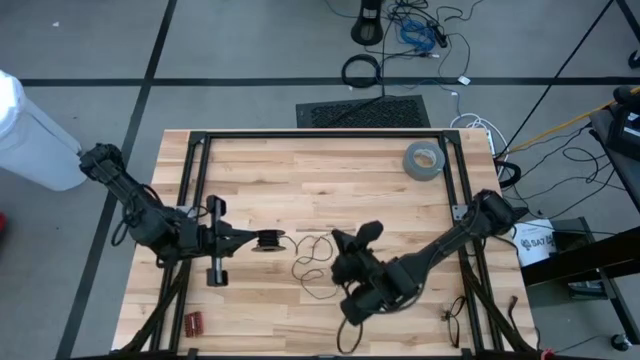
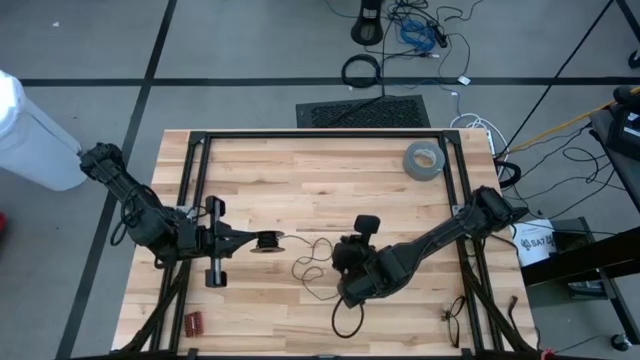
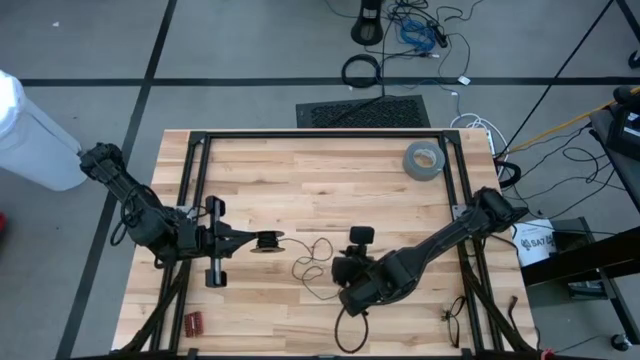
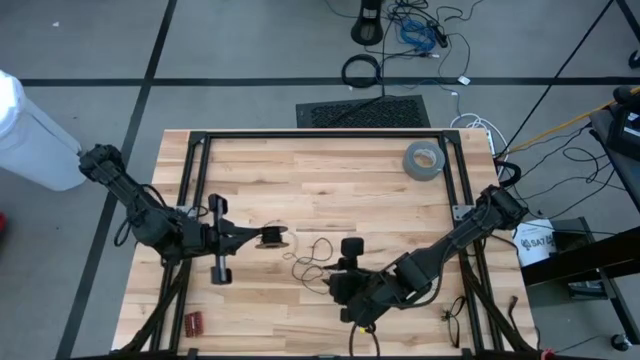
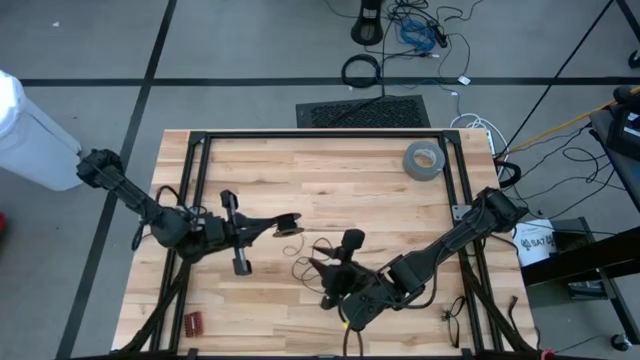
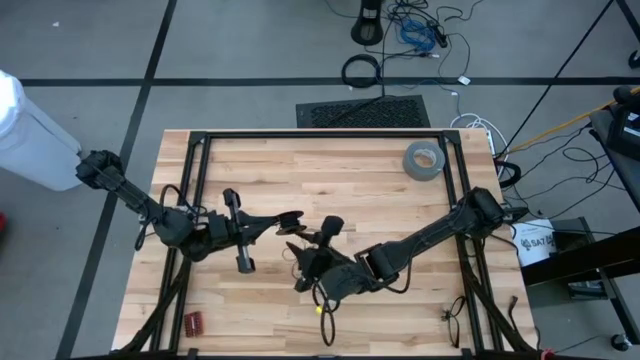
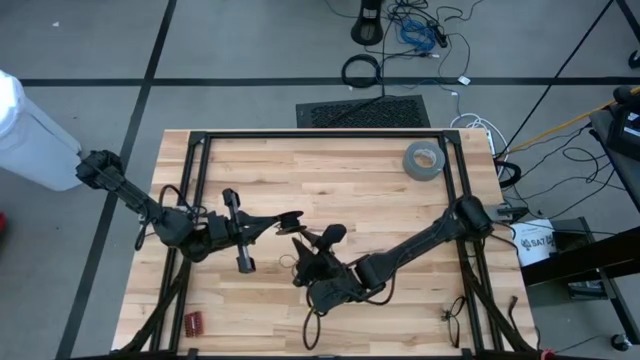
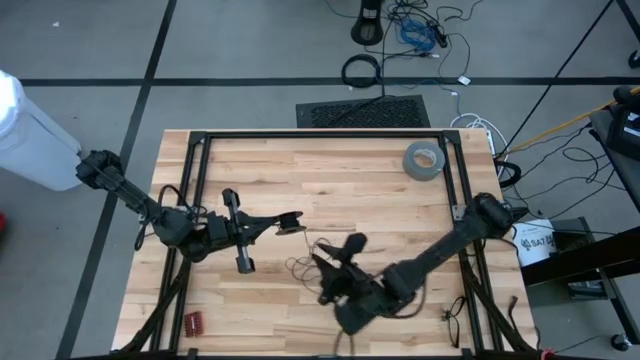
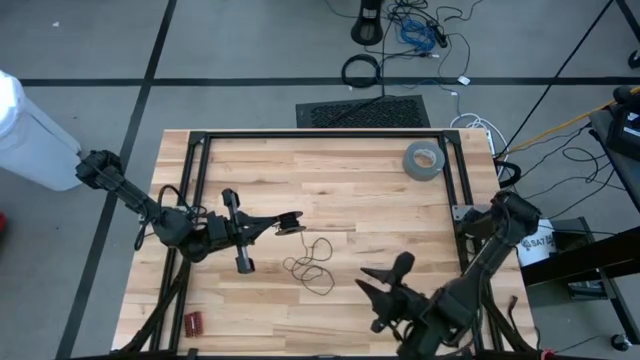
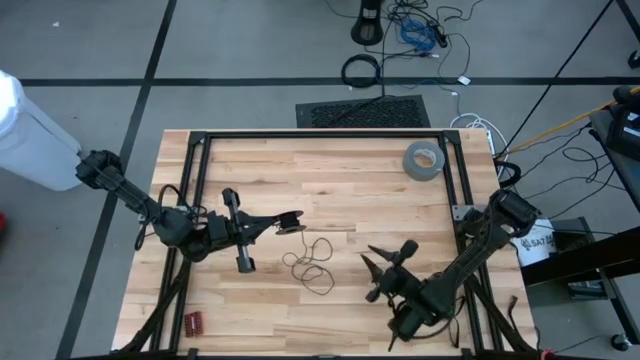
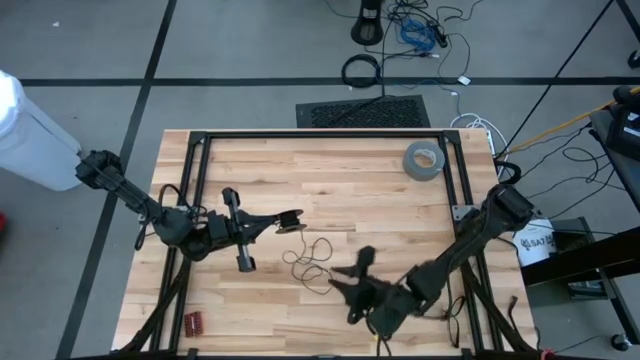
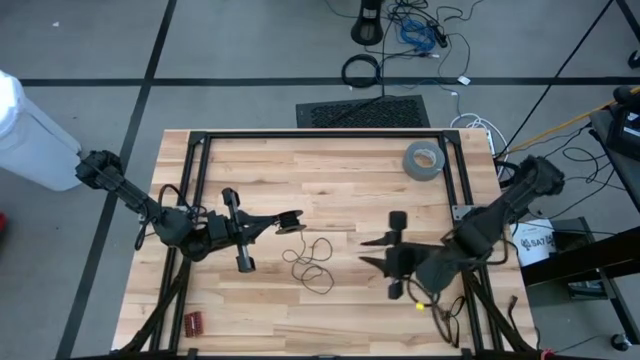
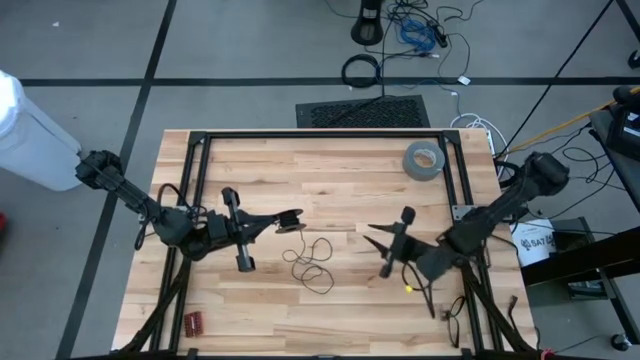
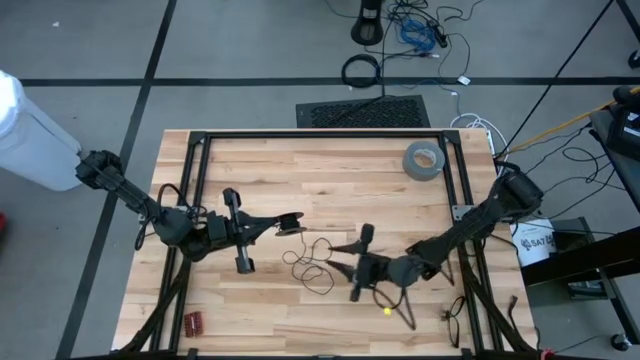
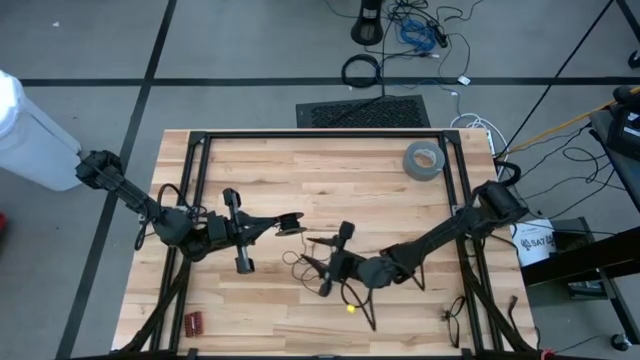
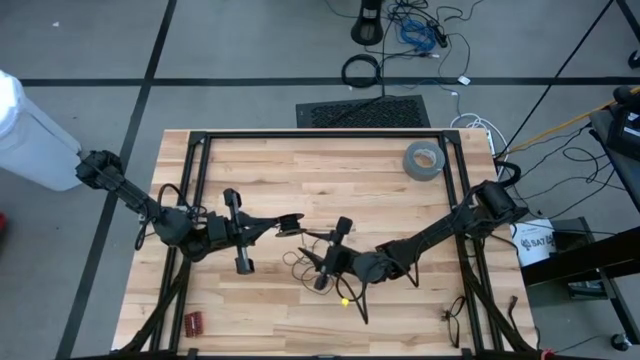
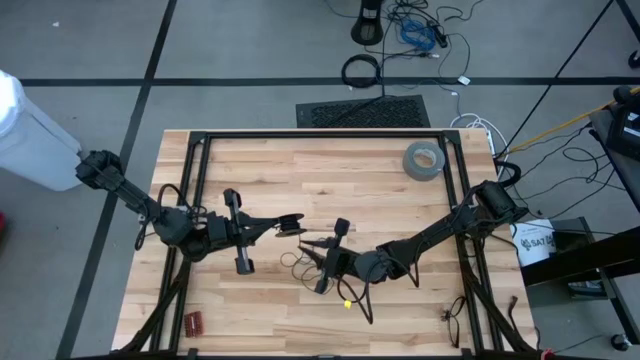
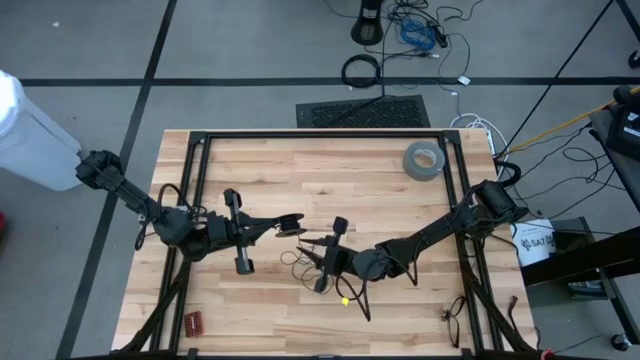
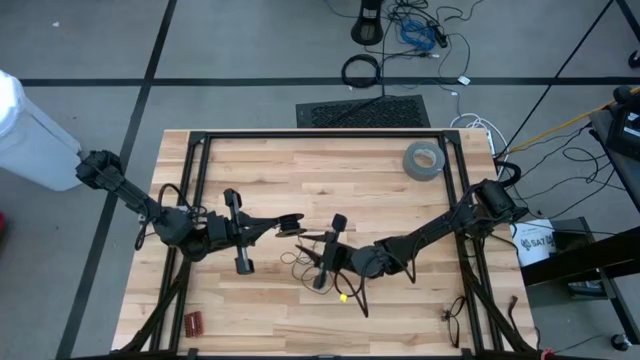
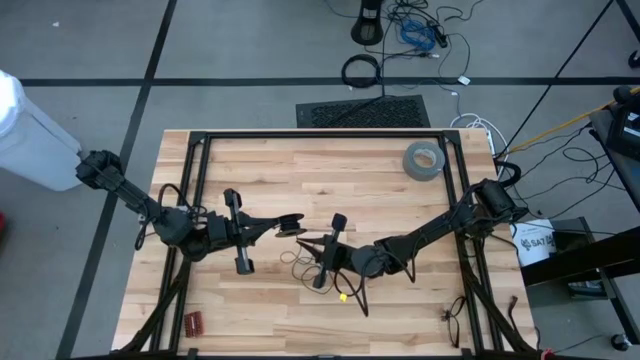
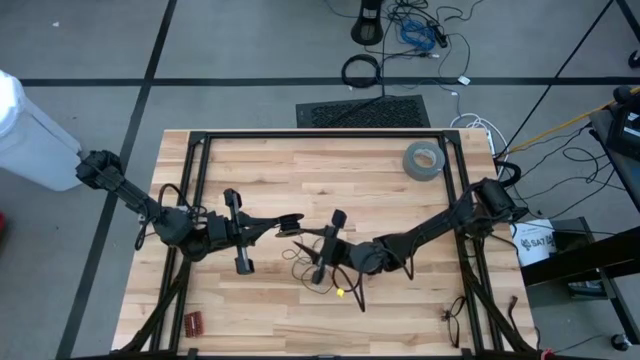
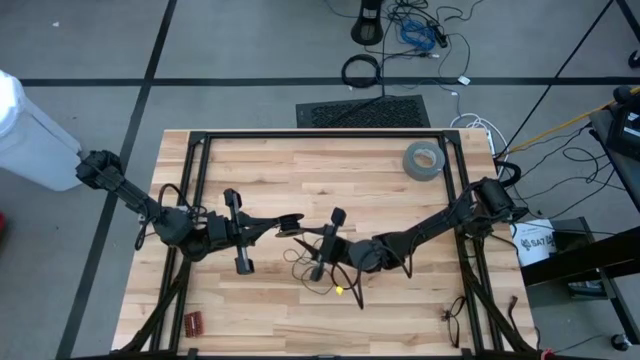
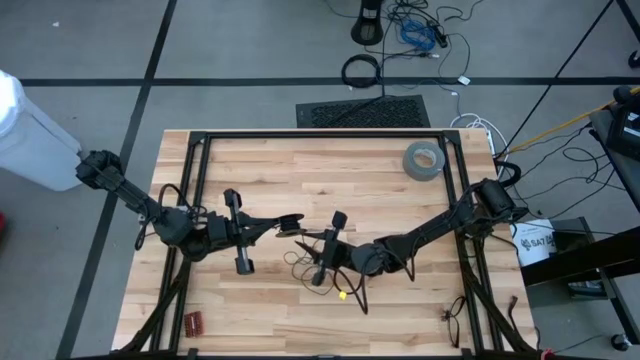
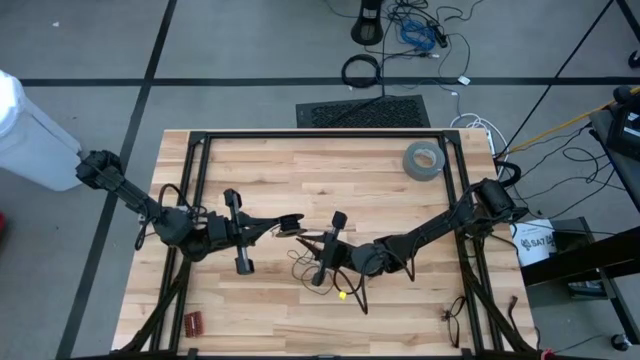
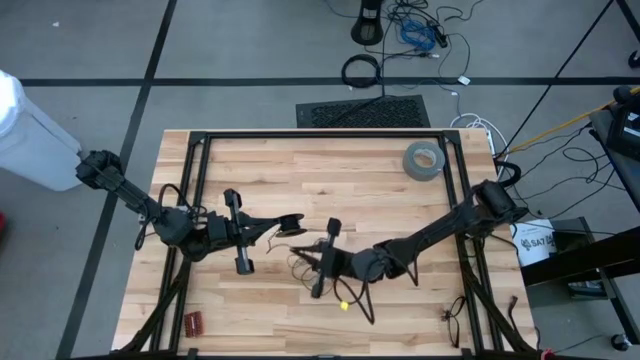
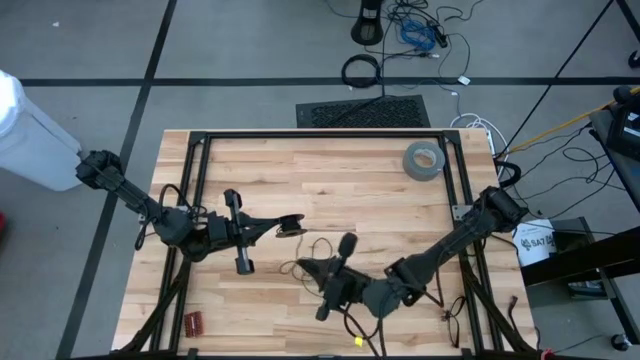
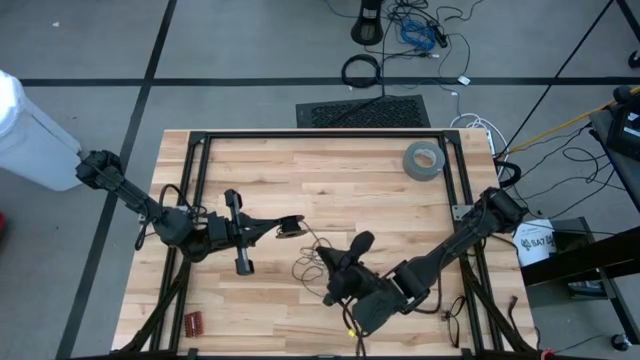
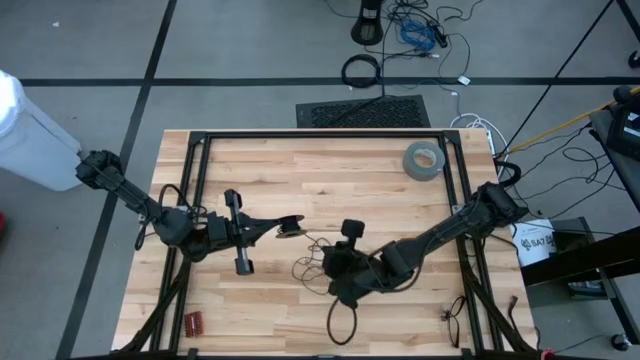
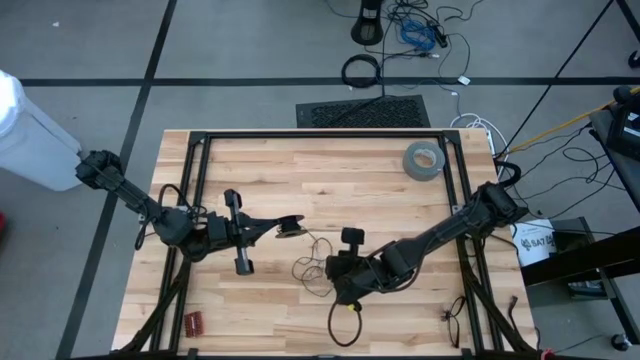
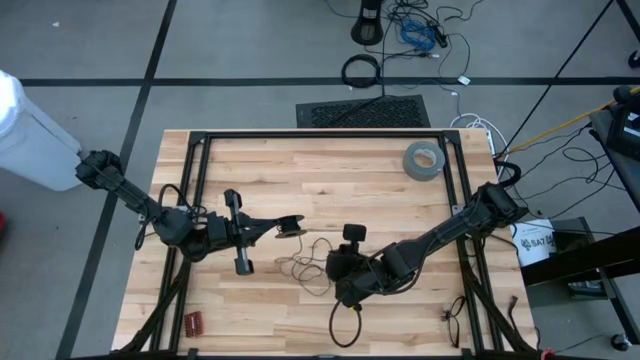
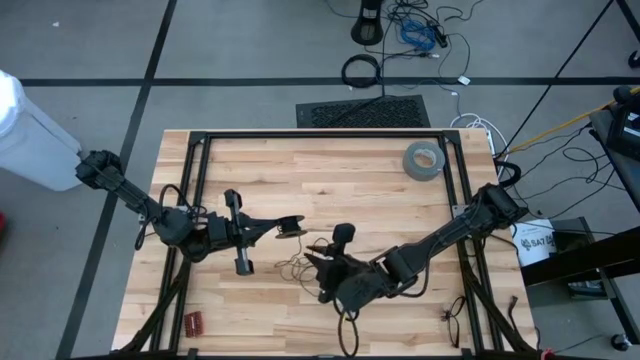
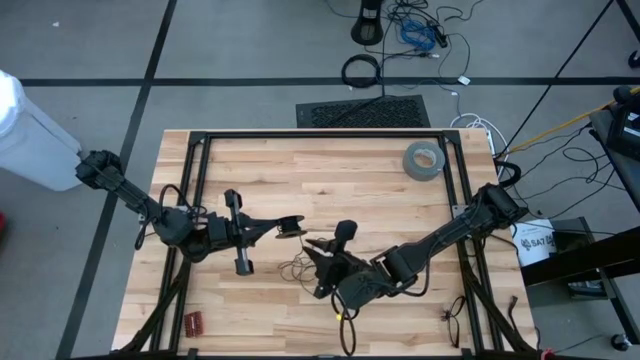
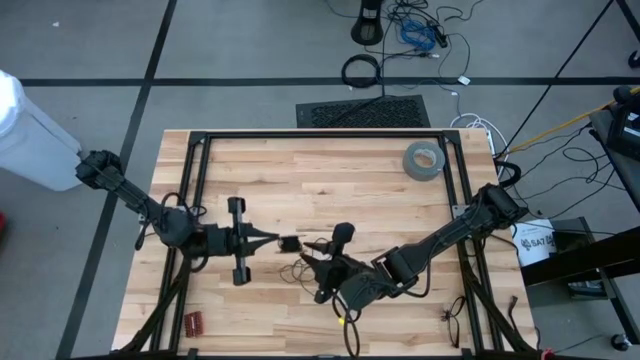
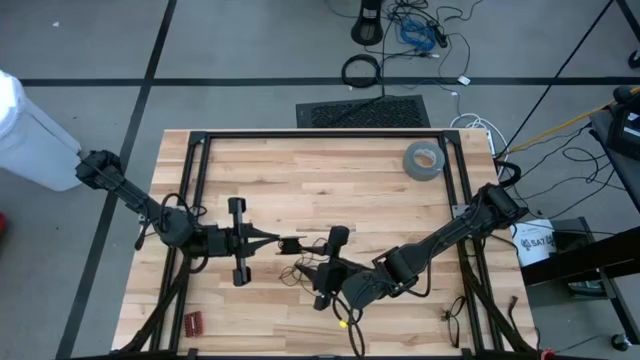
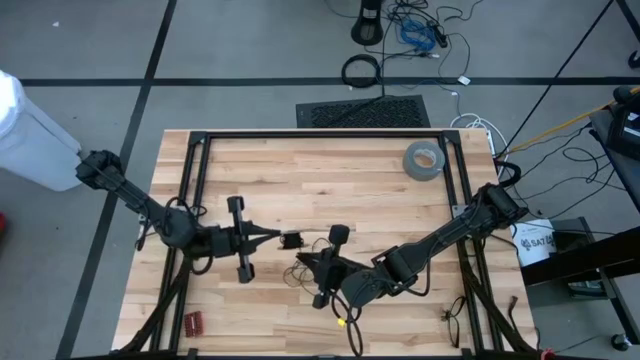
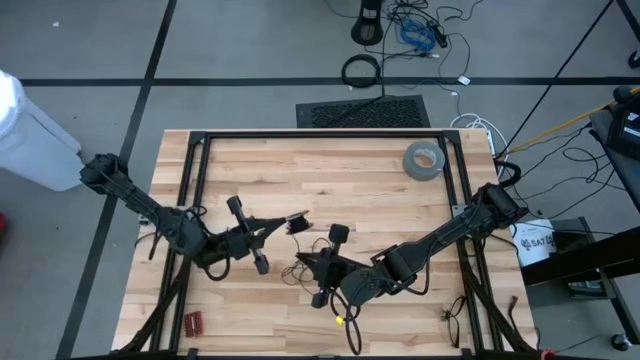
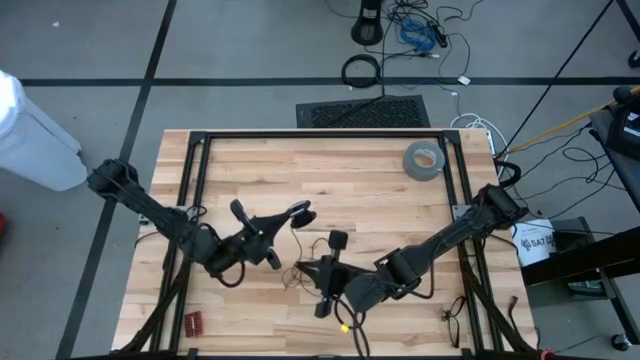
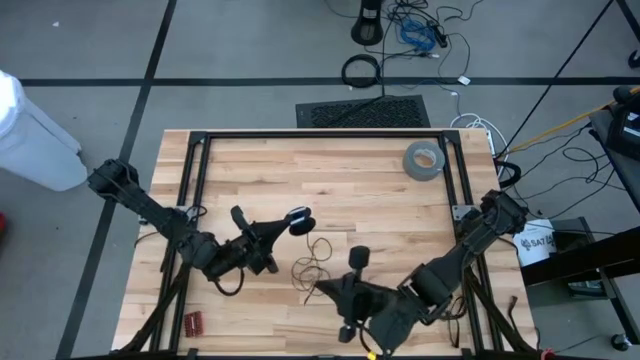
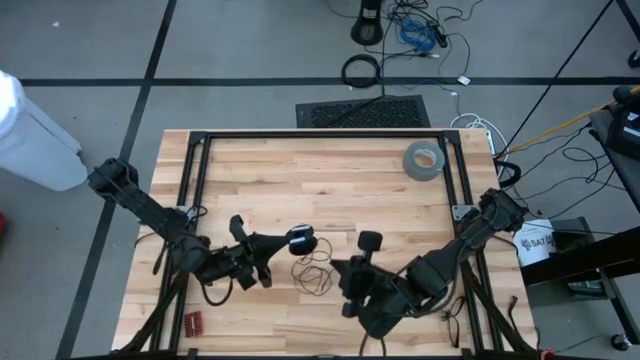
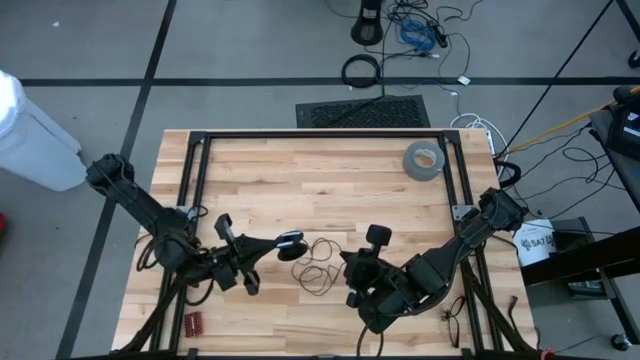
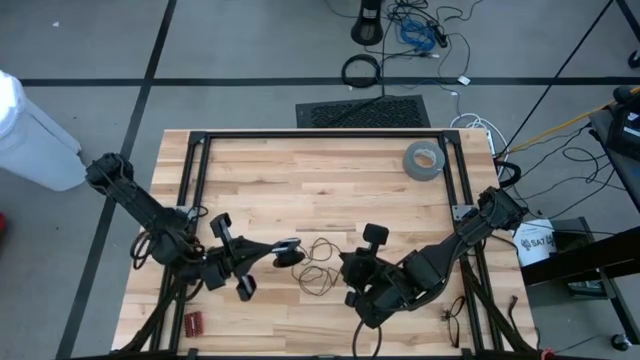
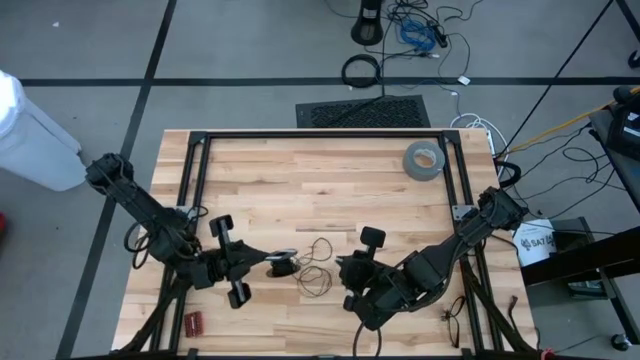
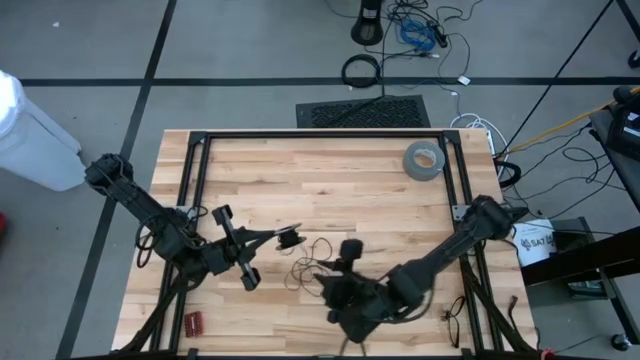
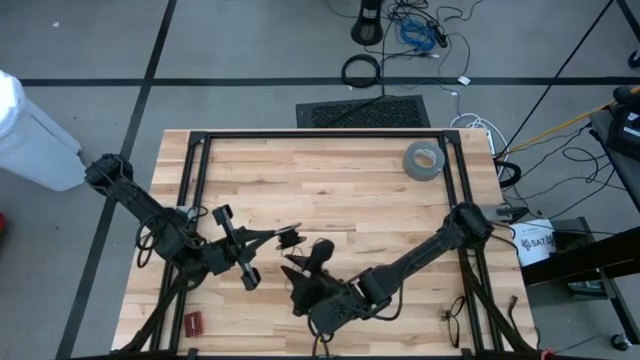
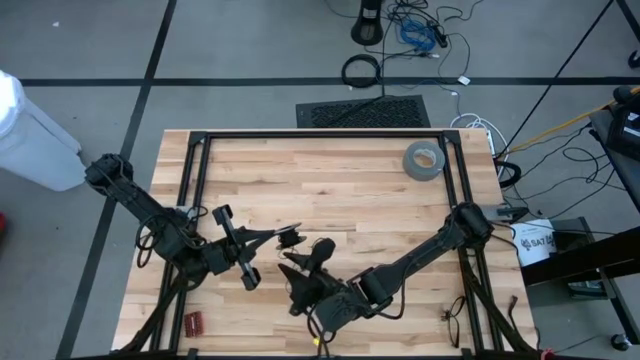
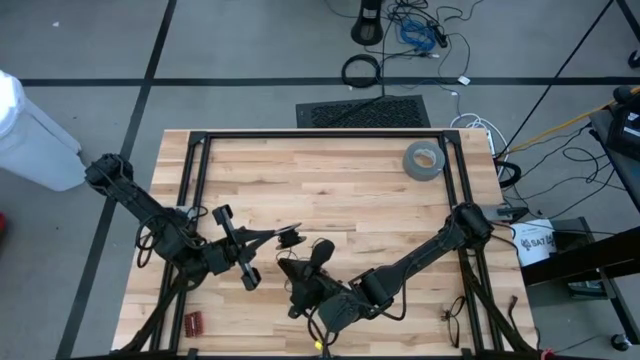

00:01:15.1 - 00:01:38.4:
Task: Coil cords
Uncoil the black wire from the spool
